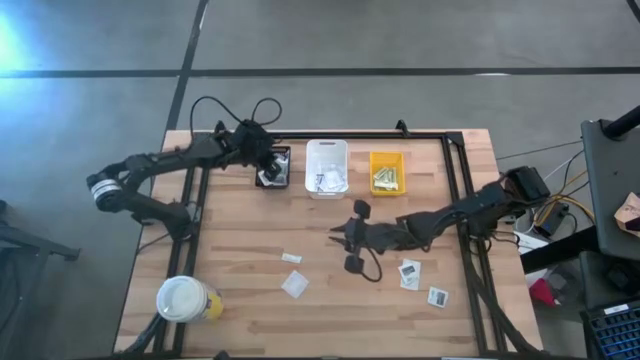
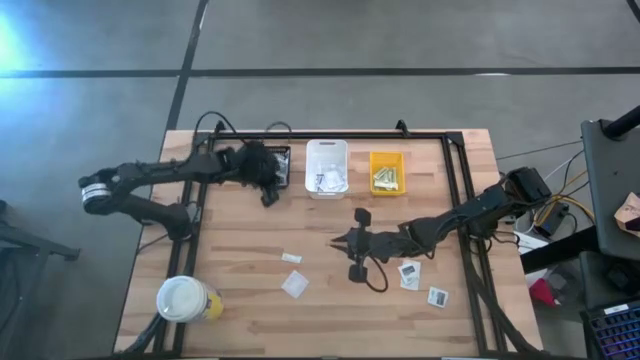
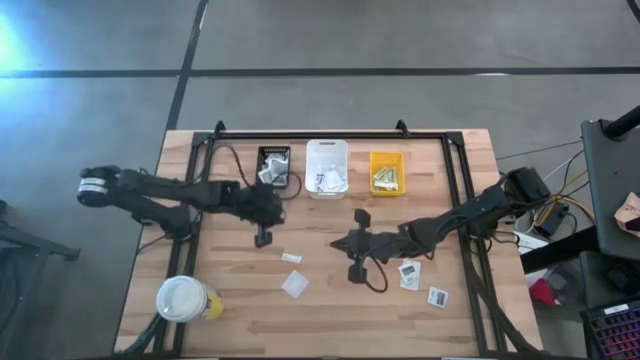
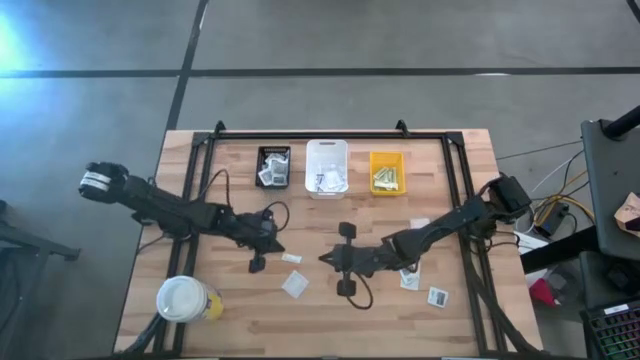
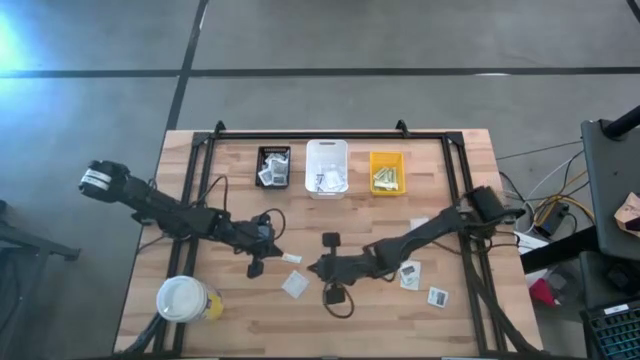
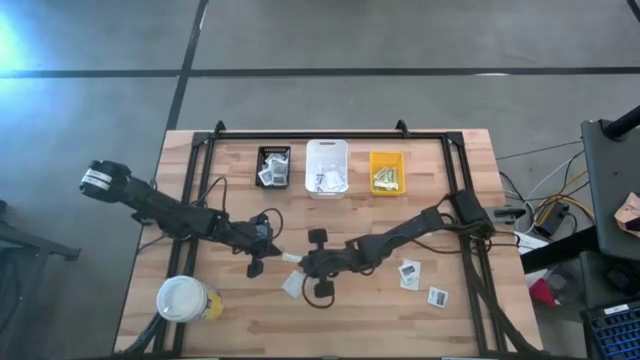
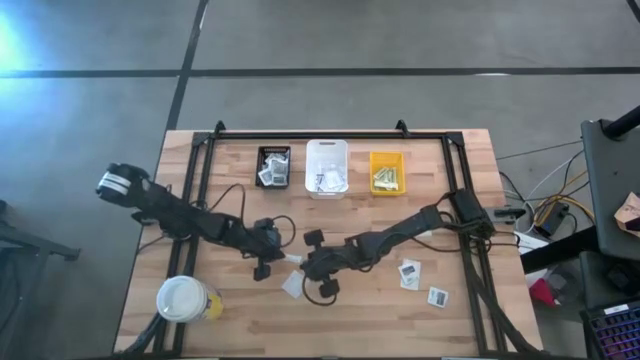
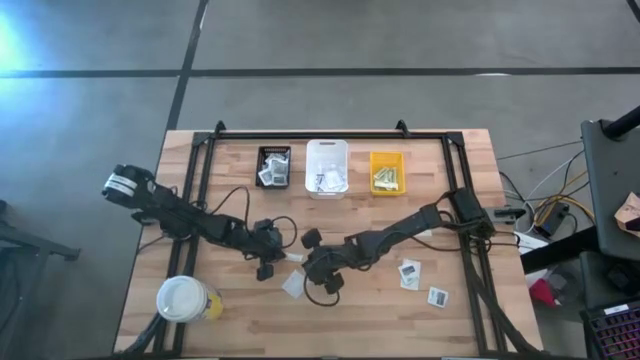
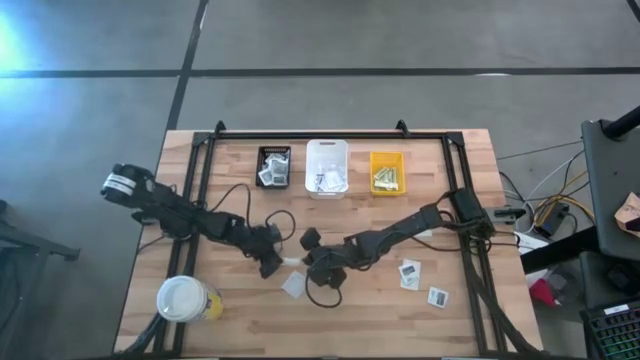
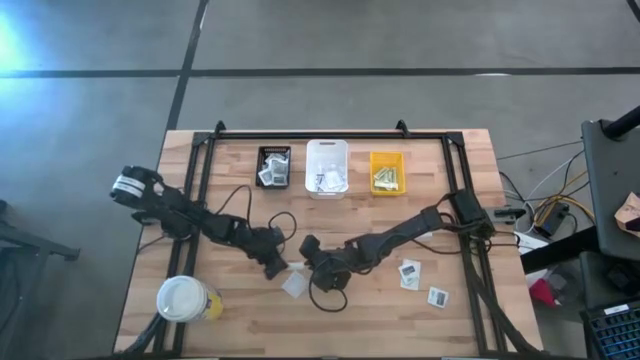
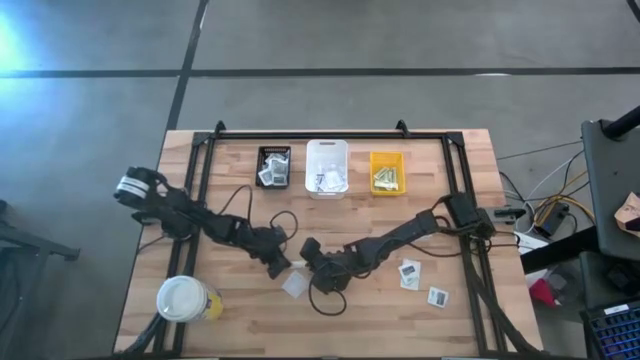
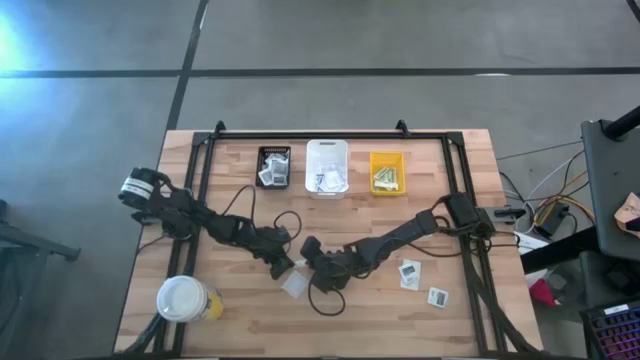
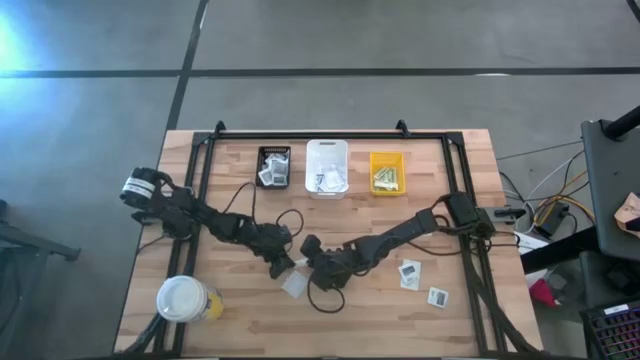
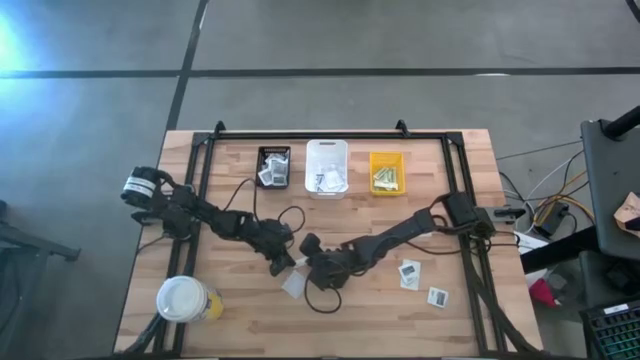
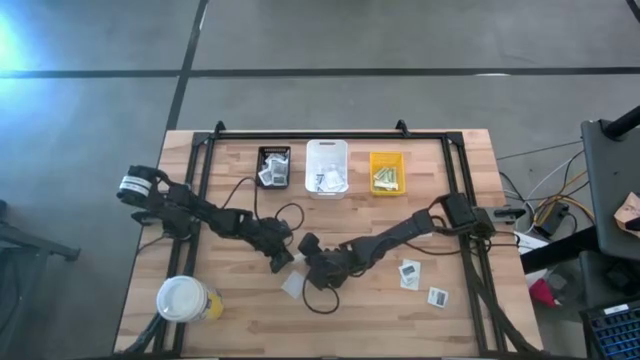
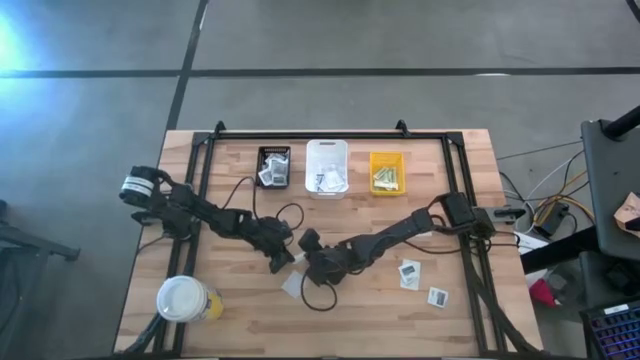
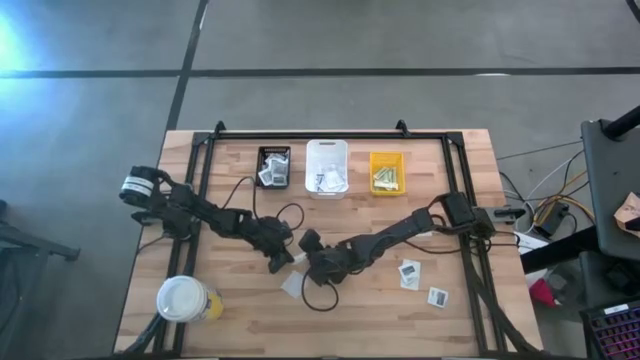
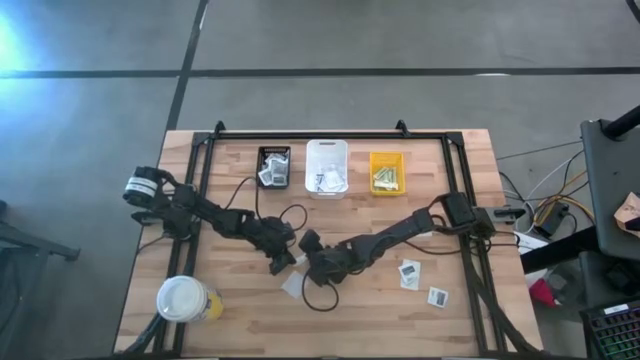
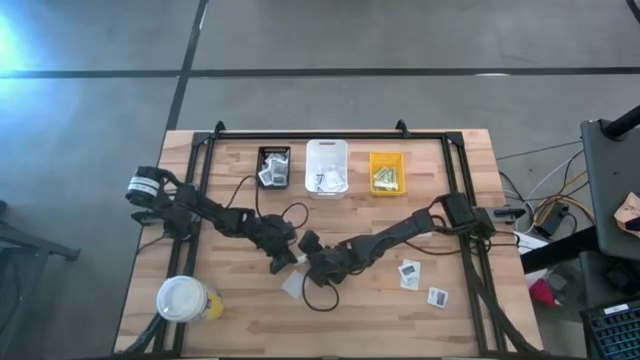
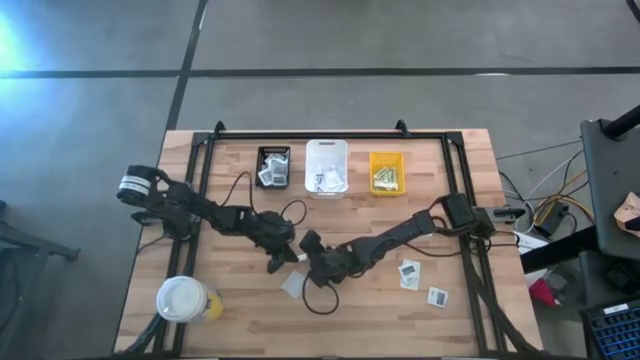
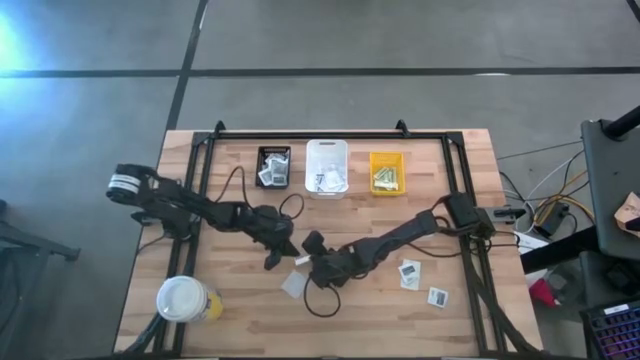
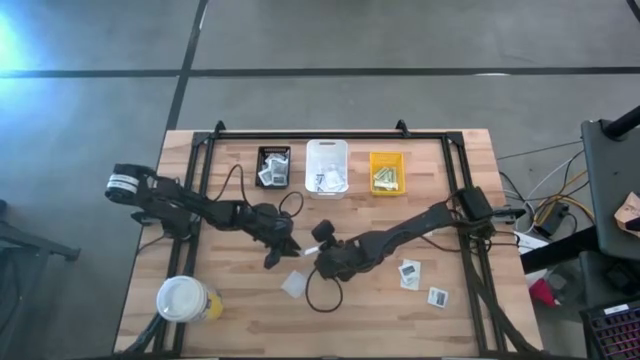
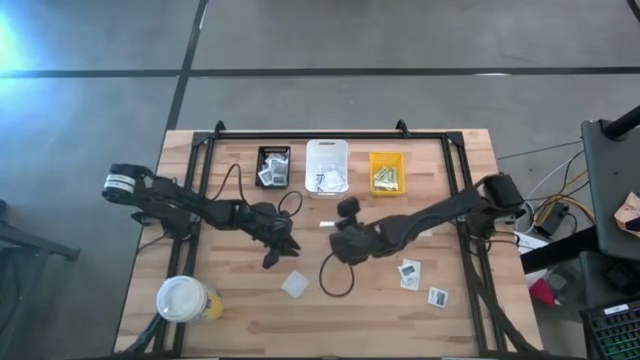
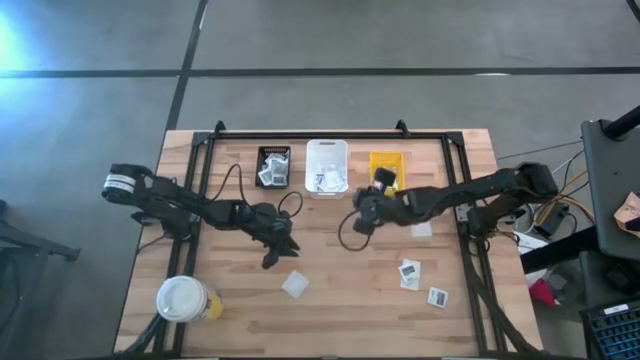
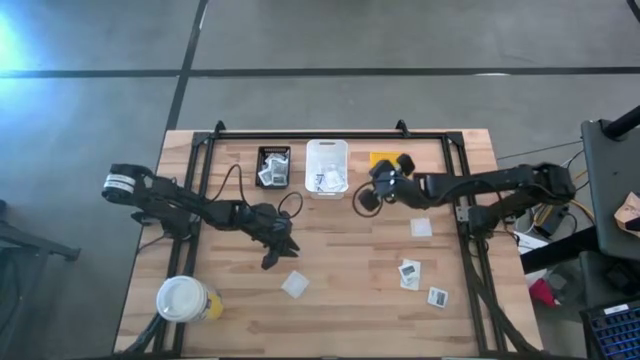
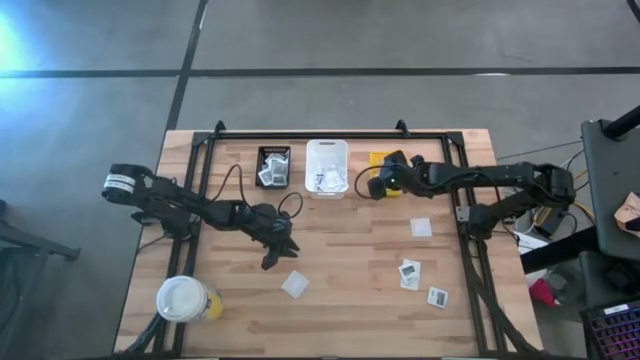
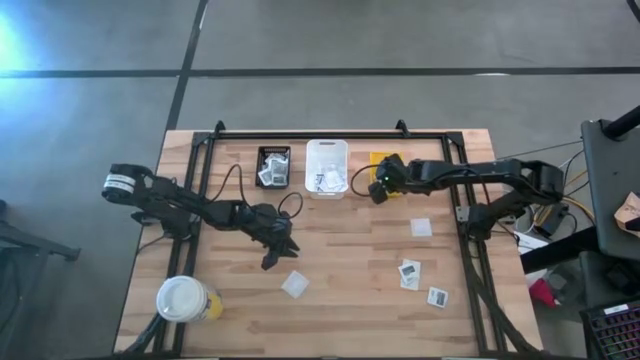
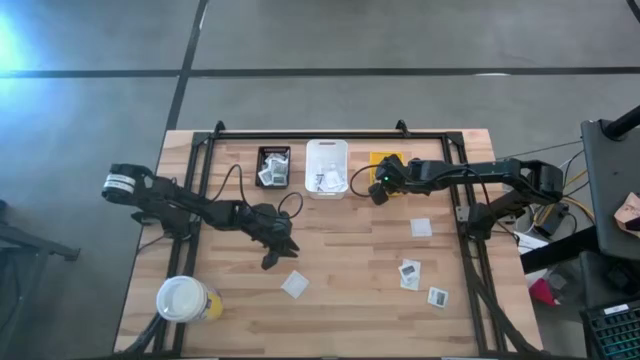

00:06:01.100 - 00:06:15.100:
Task: Pick & Place First Aid Supplies
Put the green bandage into the yellow basket

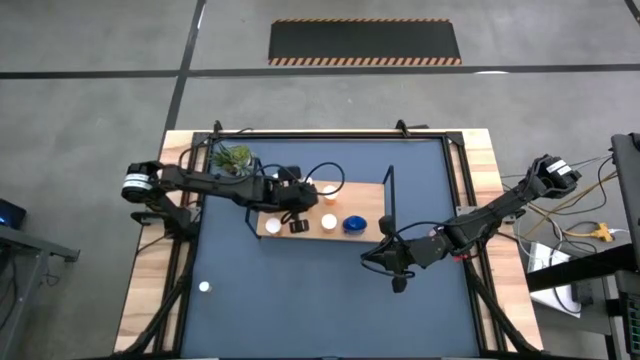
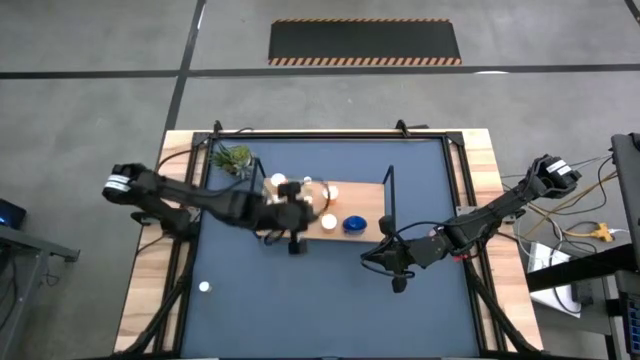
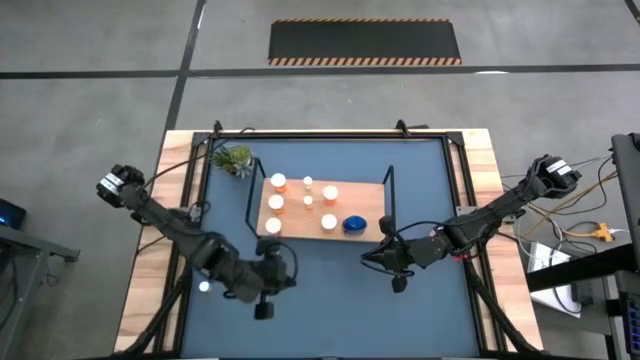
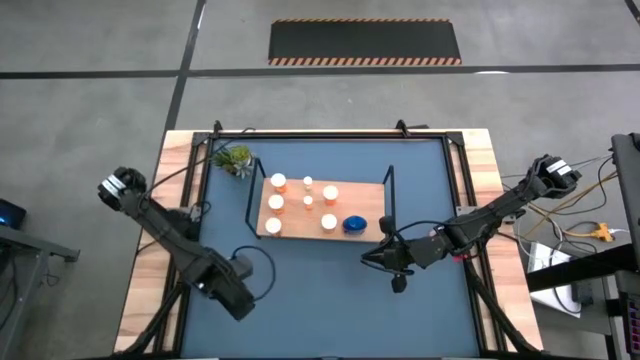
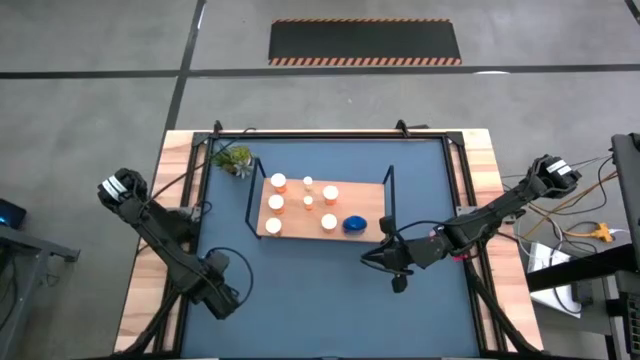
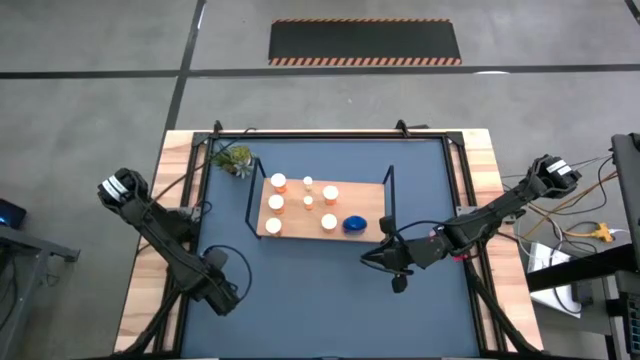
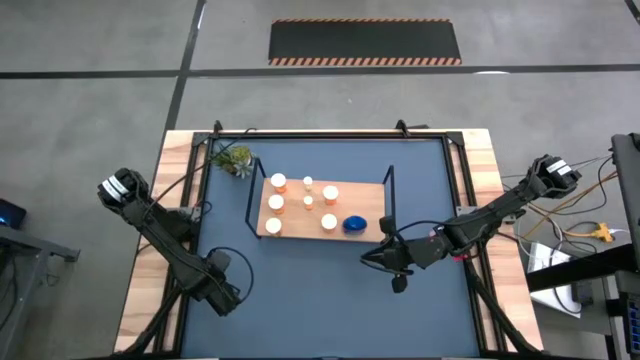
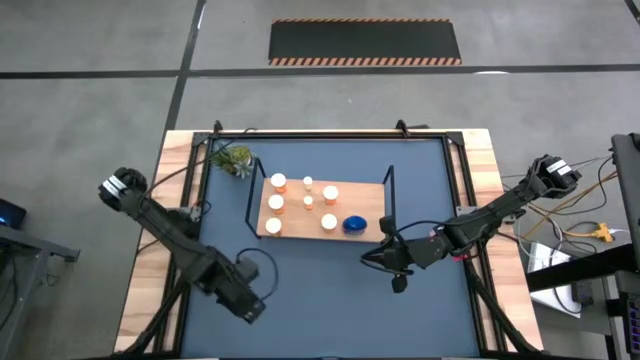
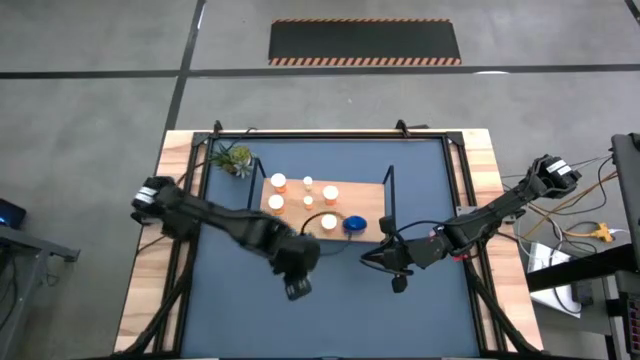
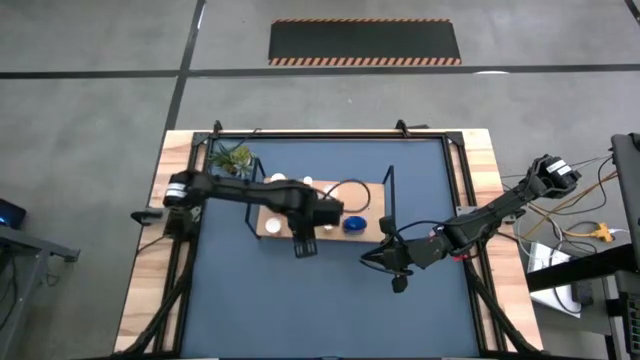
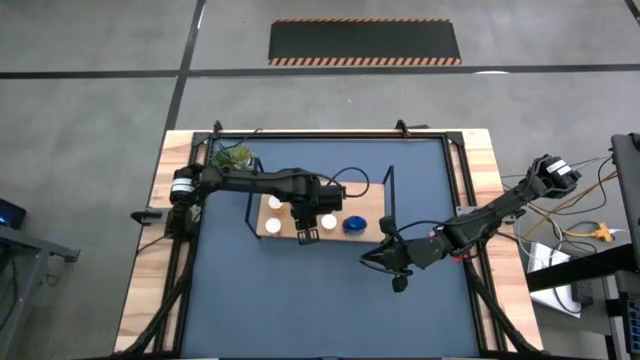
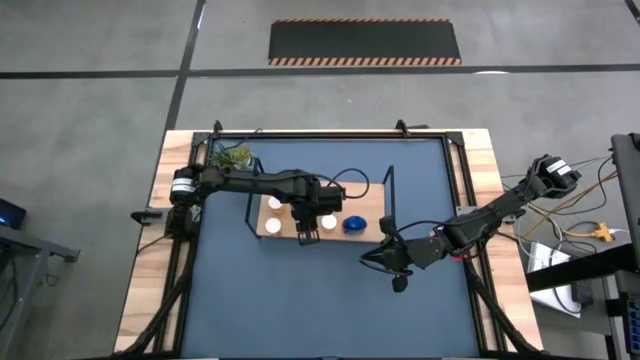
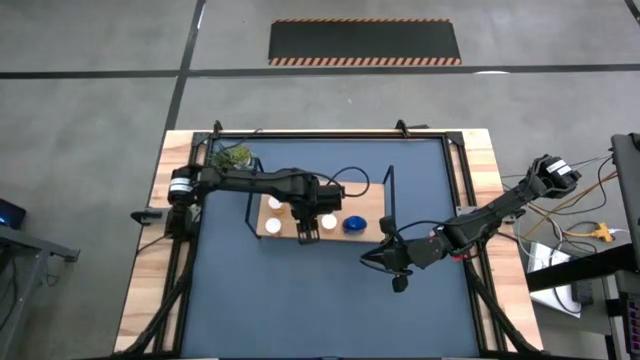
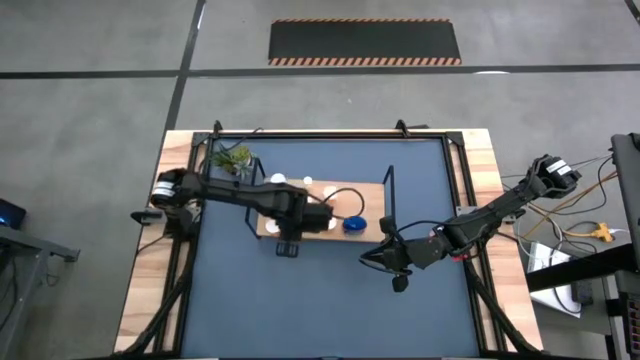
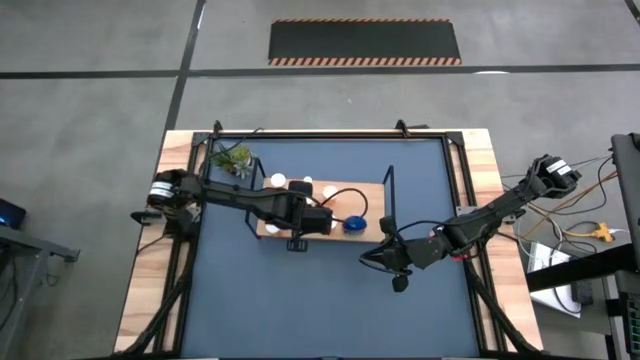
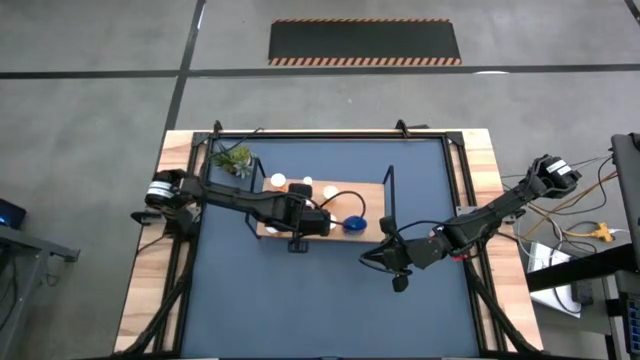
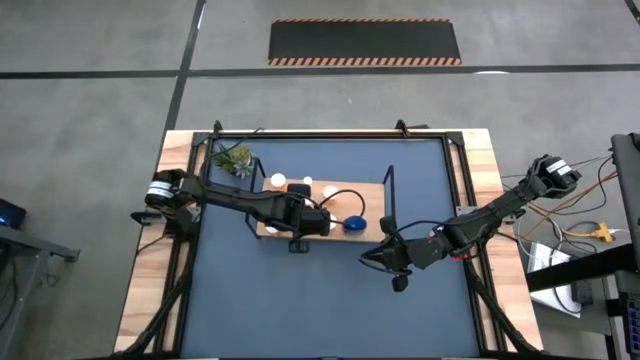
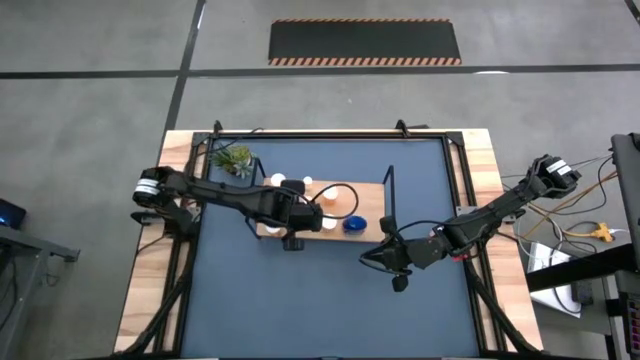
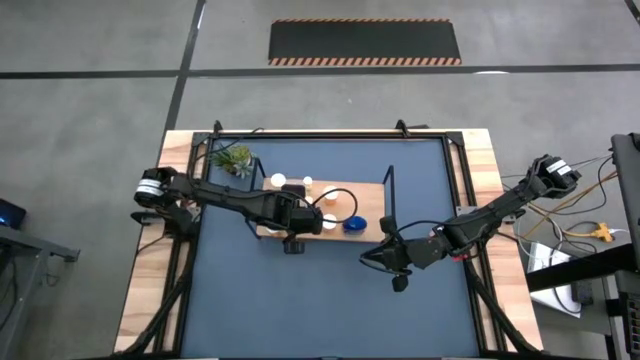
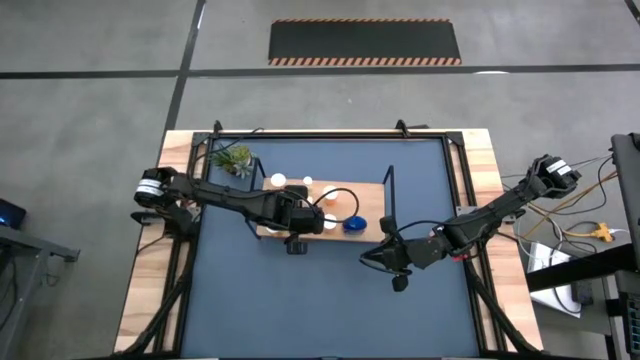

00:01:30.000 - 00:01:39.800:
Task: Pick and place medicine bottles onto shelf by color
Put the yellow pill bottle on to the shelf aligned with the small pill bottles
